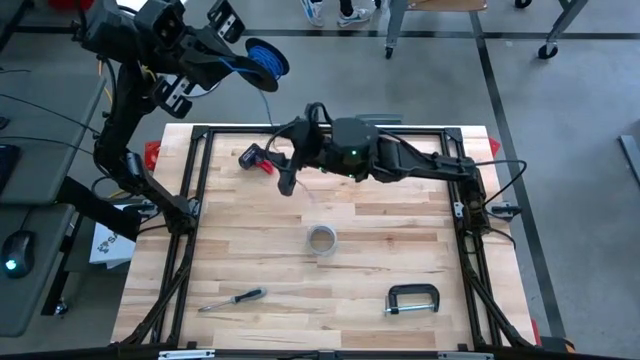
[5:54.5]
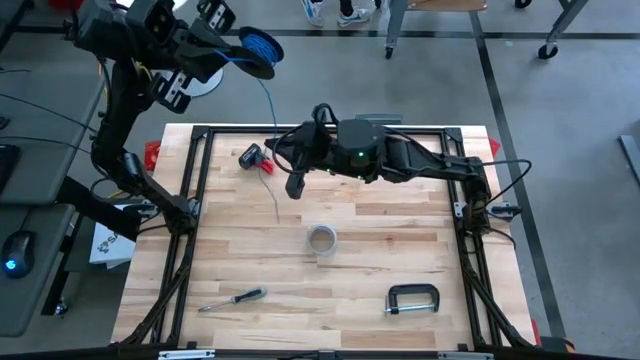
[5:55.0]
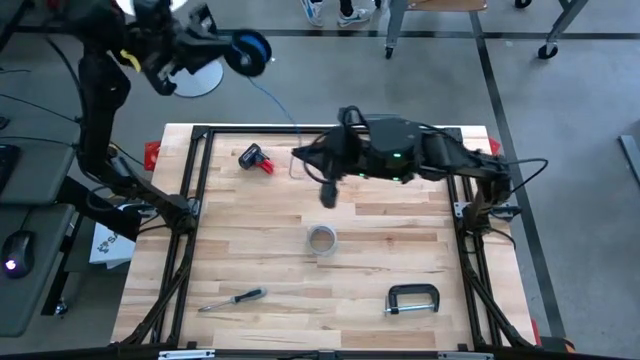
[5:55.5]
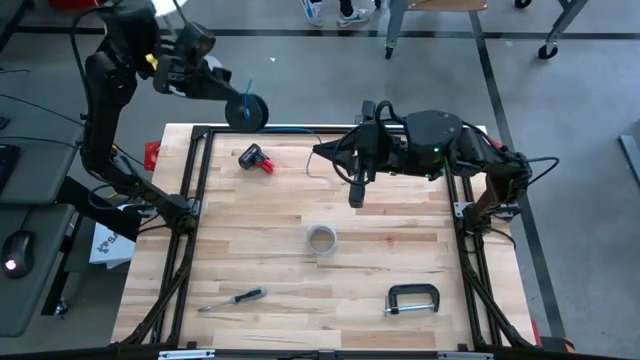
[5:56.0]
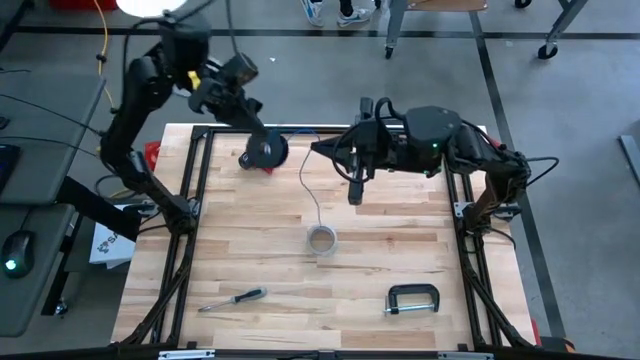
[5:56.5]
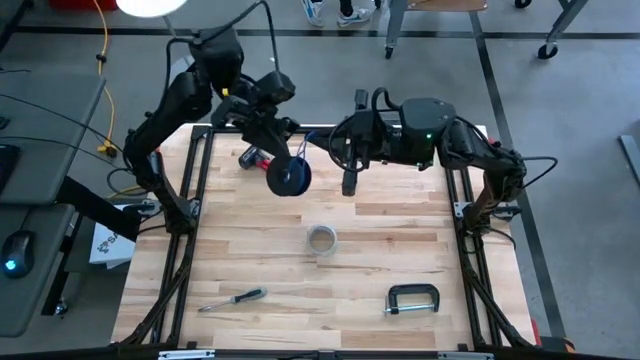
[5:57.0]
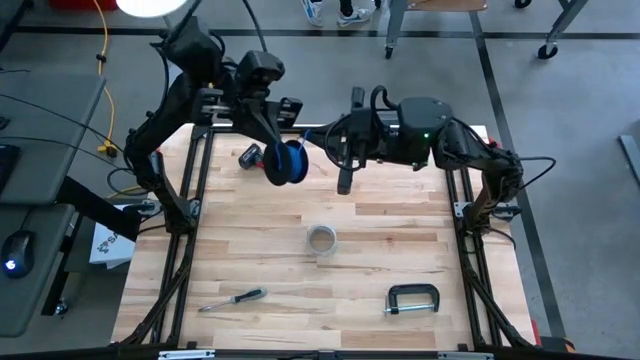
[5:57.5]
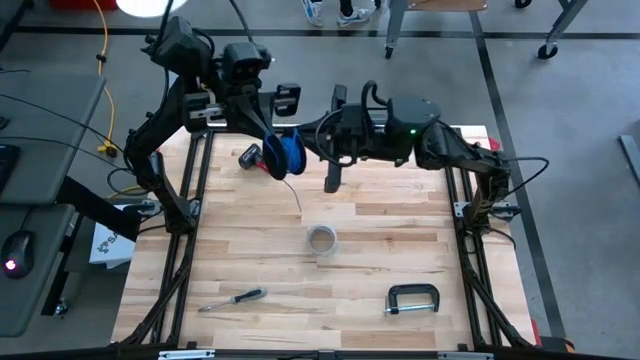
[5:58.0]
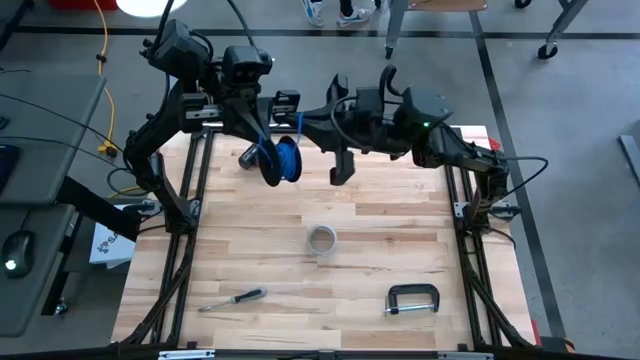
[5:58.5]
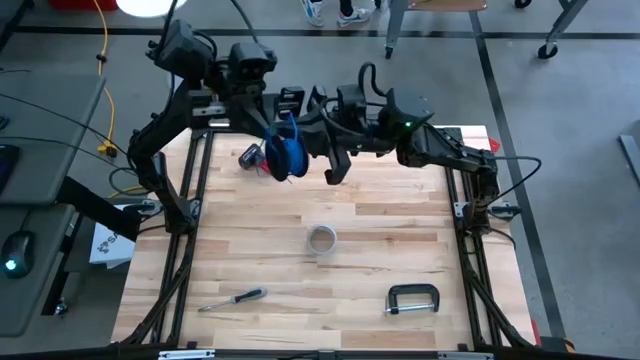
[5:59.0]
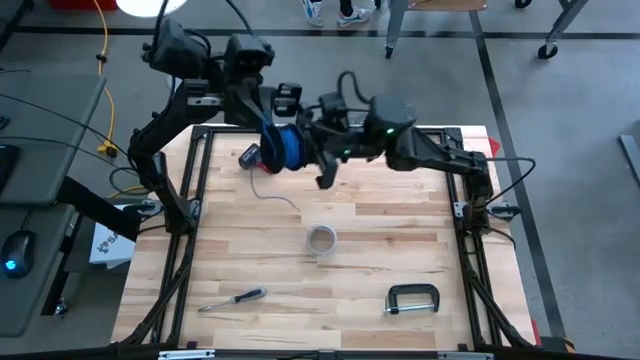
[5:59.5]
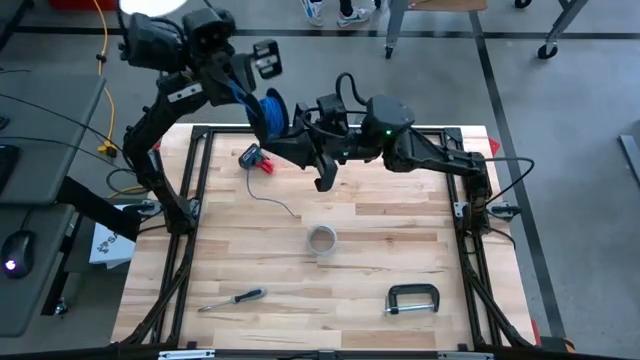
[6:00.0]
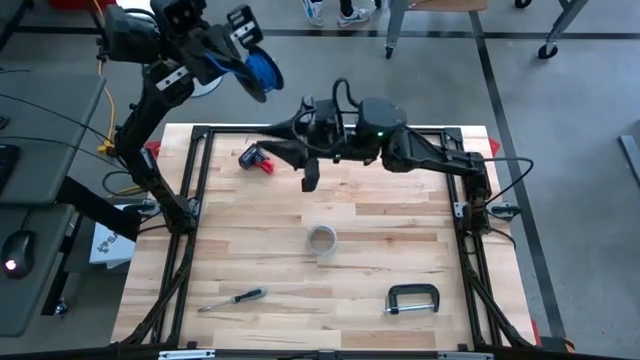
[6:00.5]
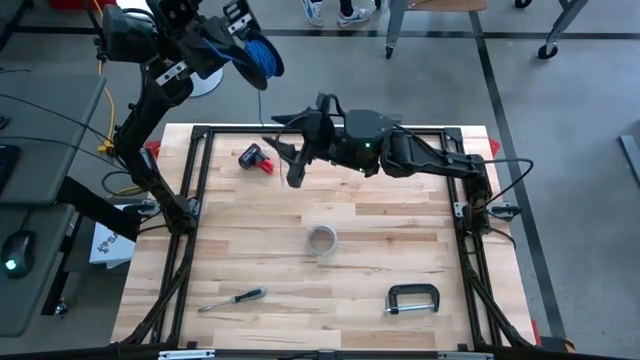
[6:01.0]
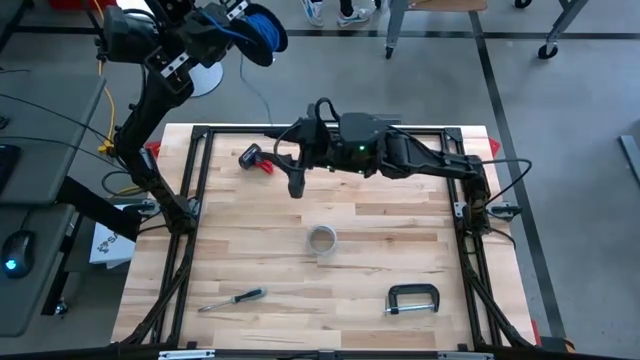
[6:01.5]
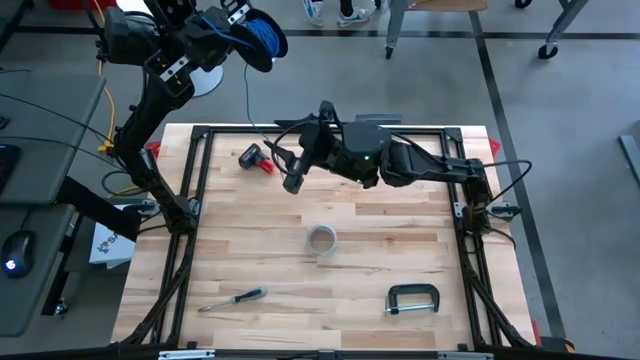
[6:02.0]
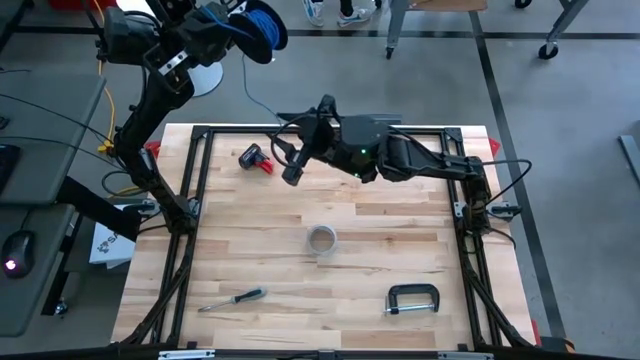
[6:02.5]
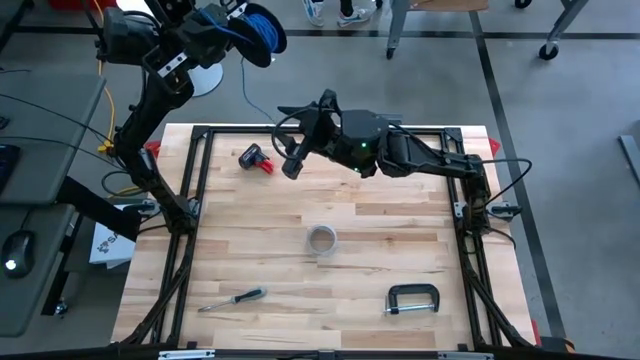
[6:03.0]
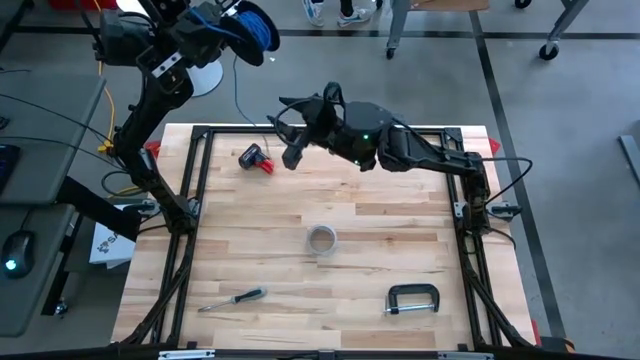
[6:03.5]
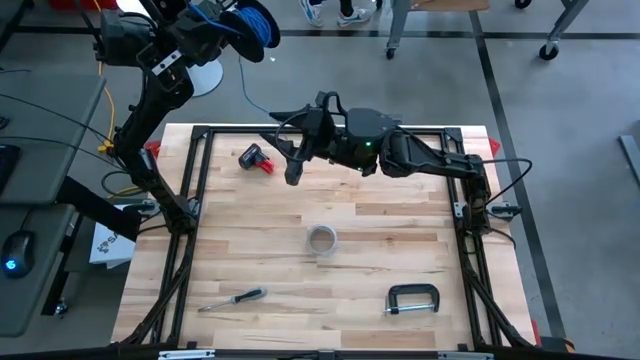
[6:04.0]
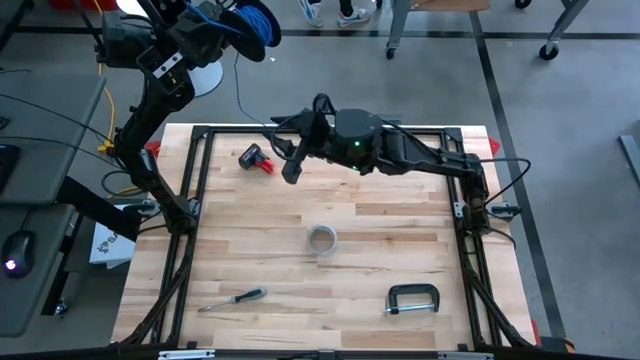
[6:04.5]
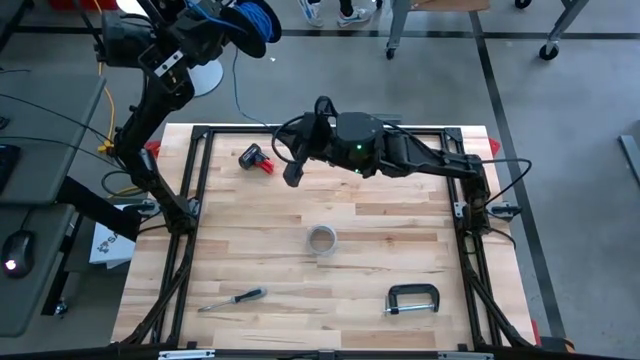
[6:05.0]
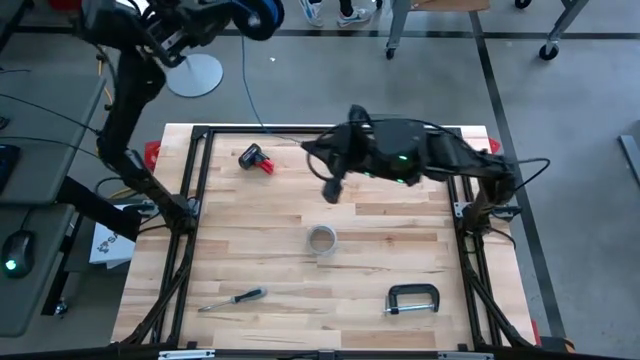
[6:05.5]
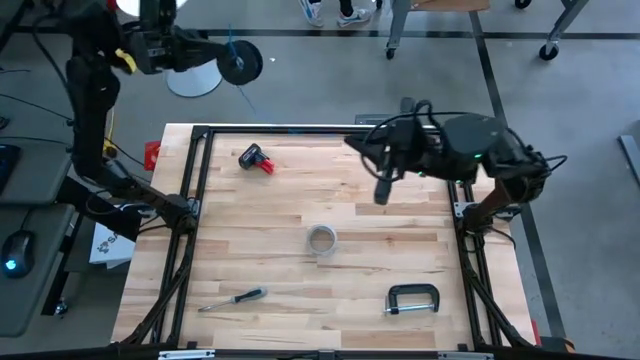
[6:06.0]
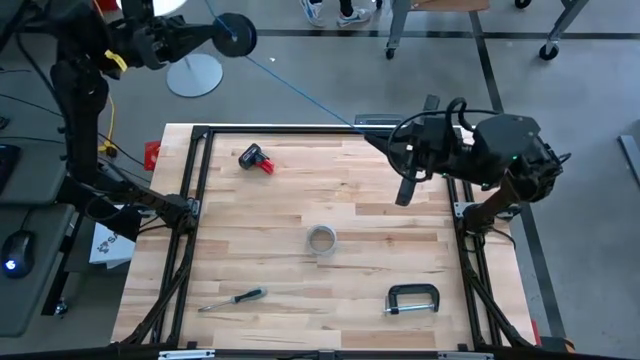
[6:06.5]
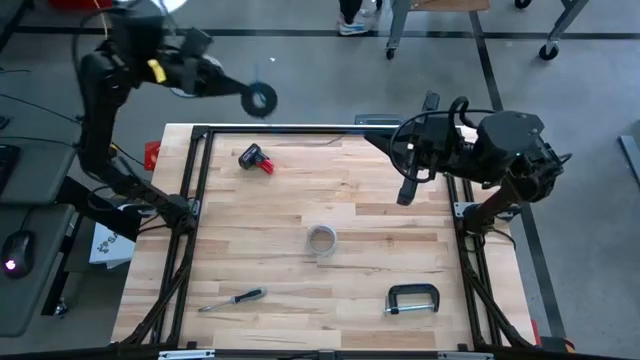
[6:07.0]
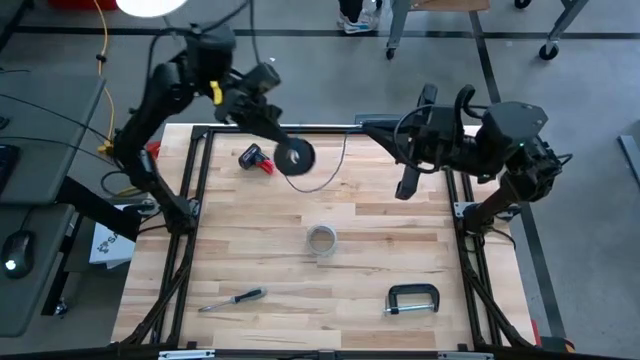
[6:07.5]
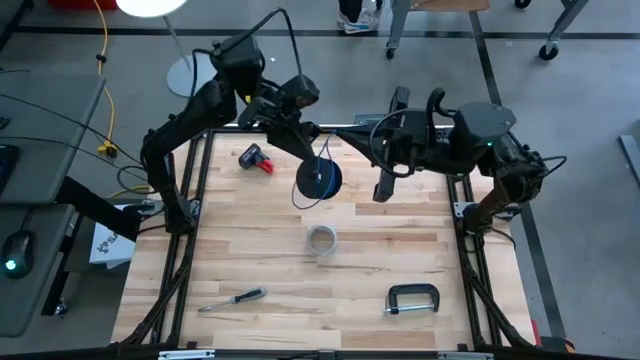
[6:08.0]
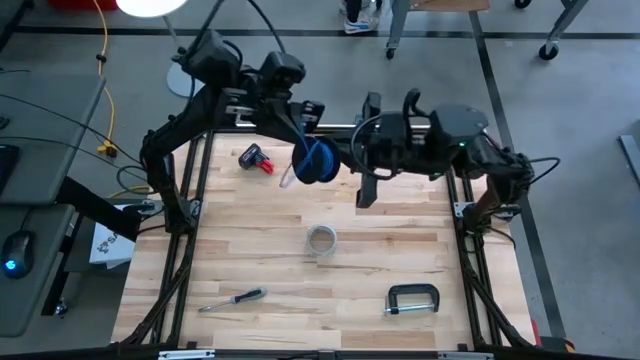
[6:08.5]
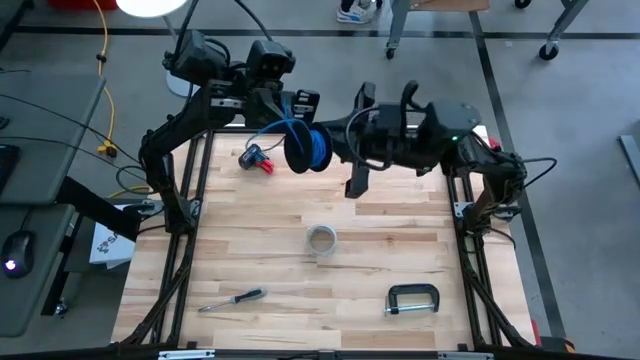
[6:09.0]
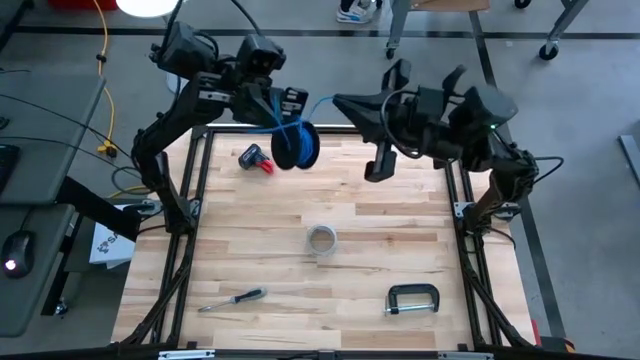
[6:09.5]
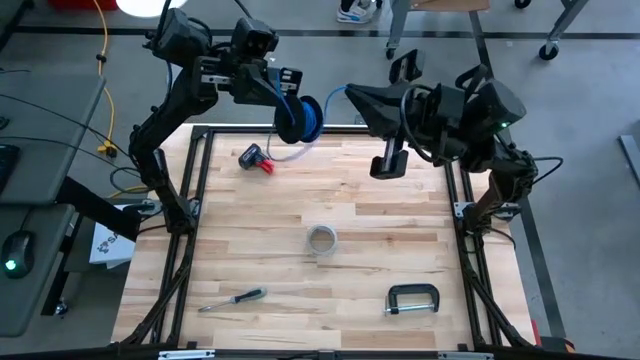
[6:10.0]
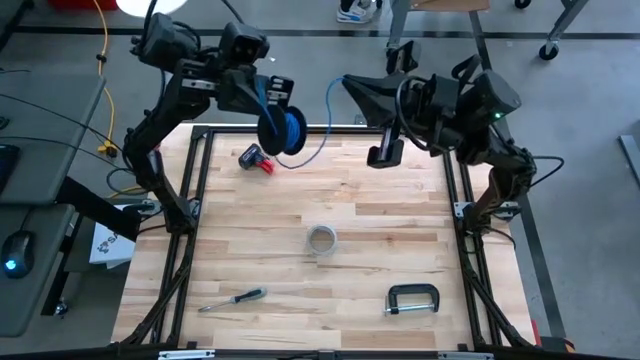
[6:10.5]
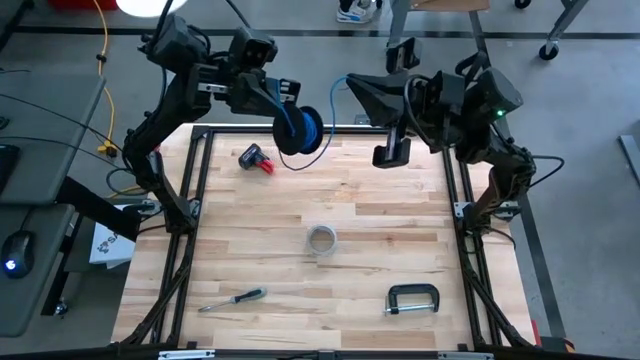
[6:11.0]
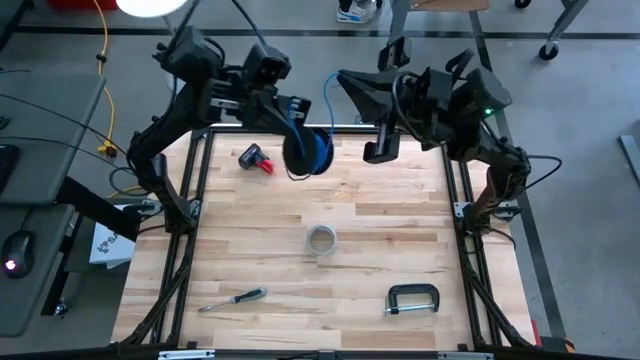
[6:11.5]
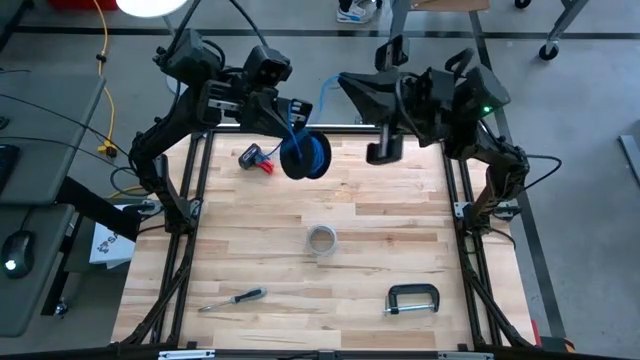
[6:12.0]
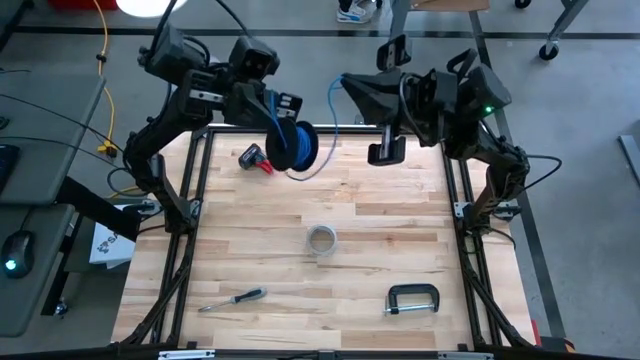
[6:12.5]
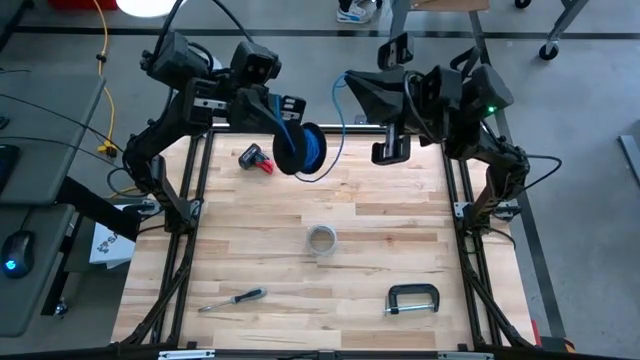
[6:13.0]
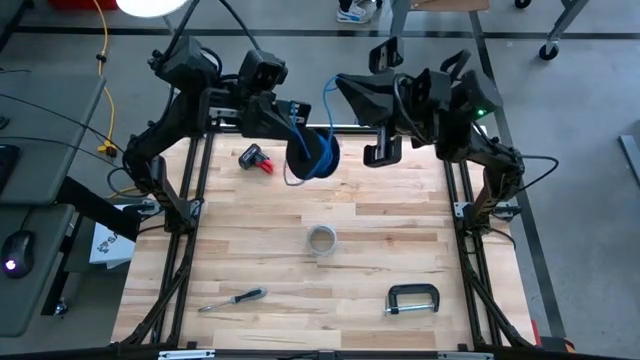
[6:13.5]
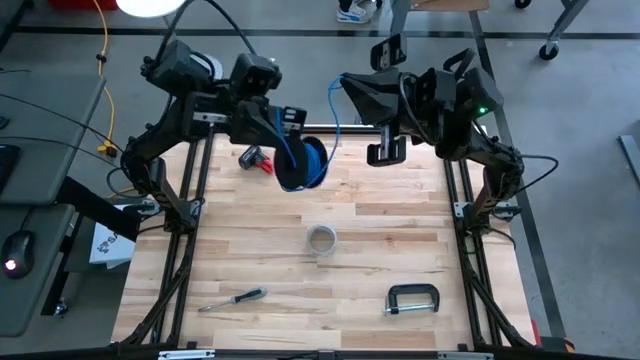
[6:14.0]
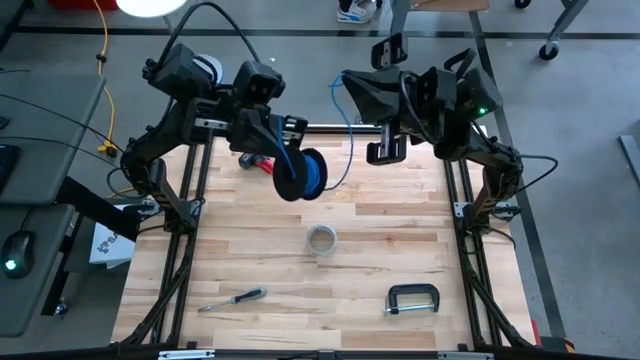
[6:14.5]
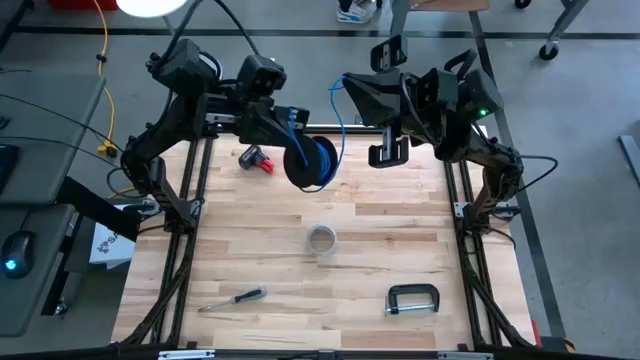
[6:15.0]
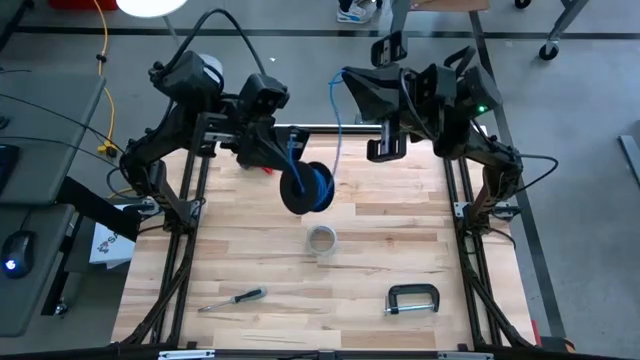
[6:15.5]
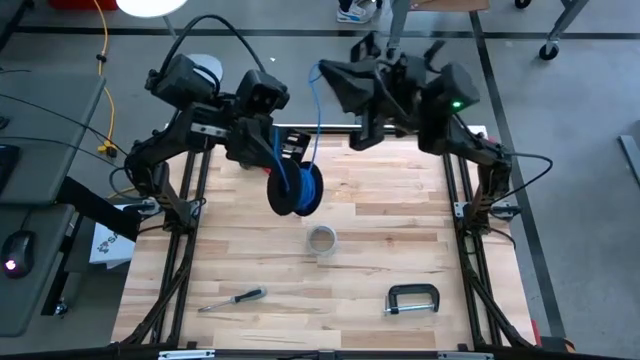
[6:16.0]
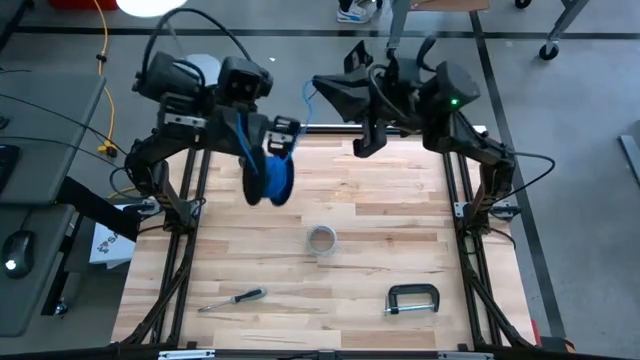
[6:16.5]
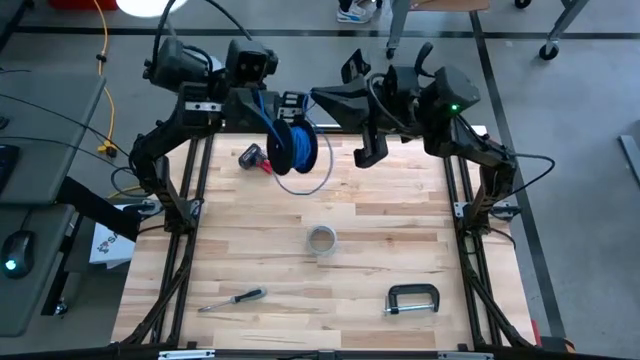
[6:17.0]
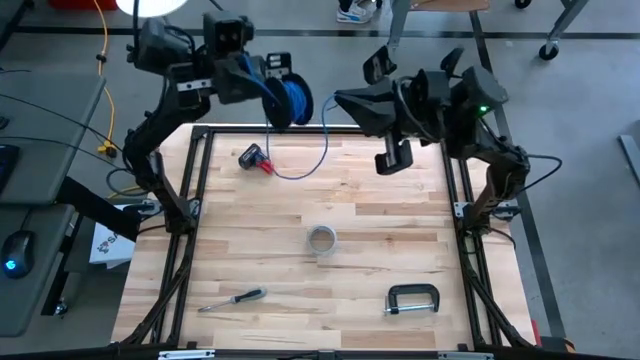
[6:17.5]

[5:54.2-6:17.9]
Task: Coil cords
Coil the blue wire on the spool
